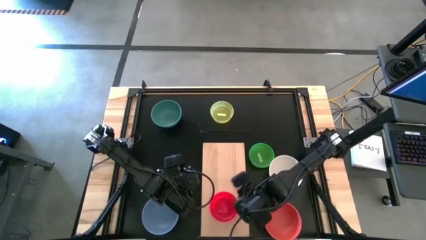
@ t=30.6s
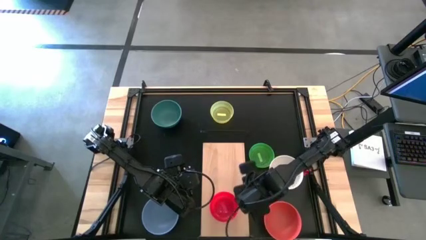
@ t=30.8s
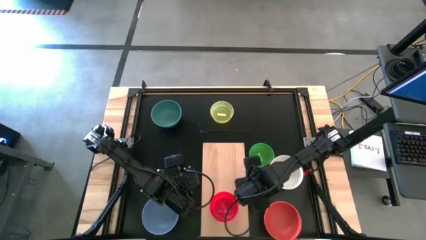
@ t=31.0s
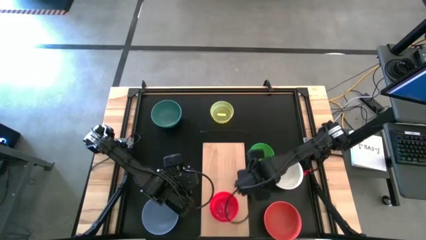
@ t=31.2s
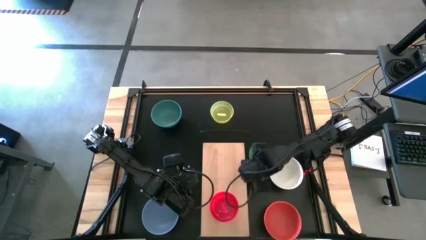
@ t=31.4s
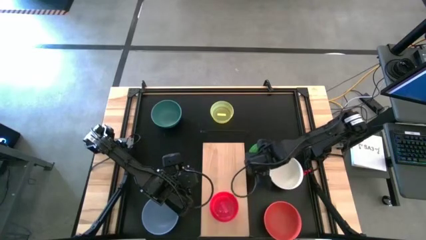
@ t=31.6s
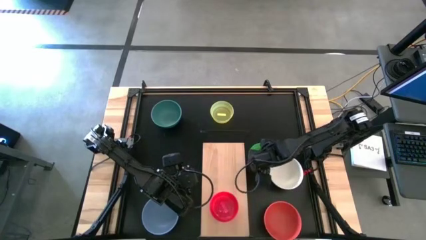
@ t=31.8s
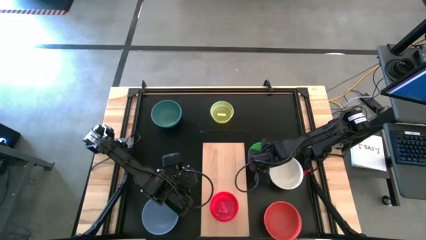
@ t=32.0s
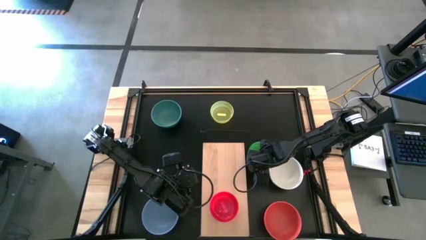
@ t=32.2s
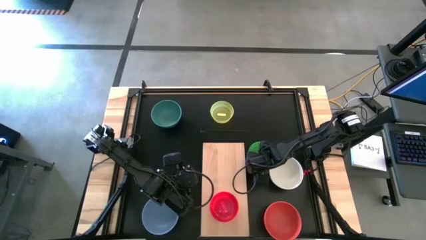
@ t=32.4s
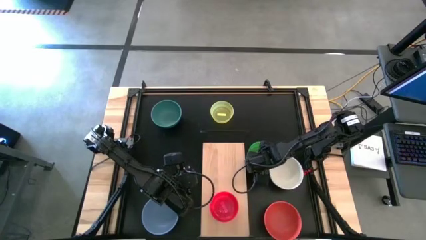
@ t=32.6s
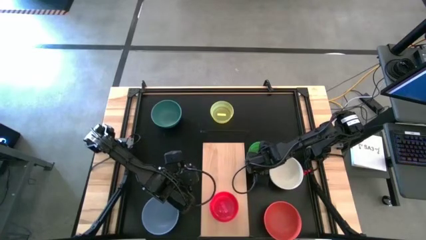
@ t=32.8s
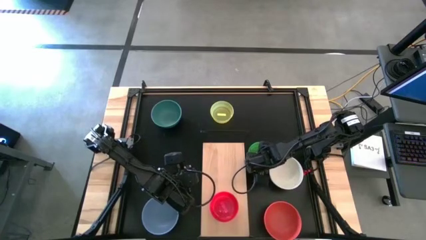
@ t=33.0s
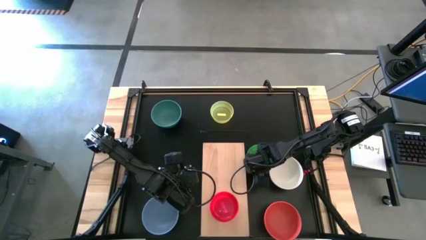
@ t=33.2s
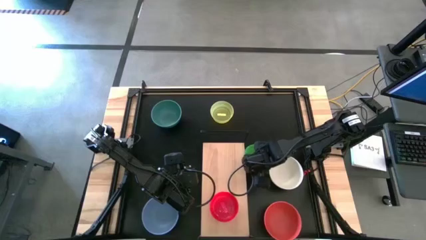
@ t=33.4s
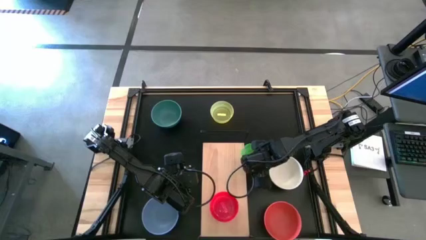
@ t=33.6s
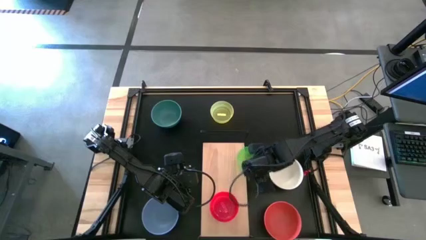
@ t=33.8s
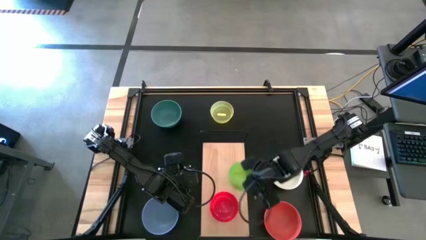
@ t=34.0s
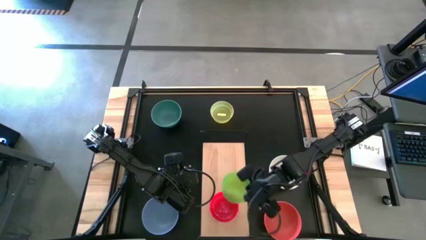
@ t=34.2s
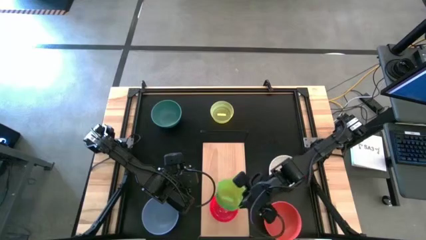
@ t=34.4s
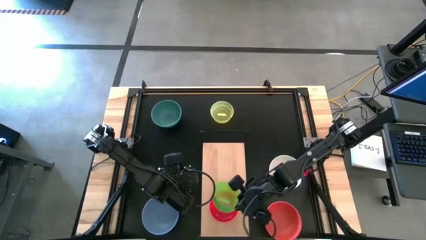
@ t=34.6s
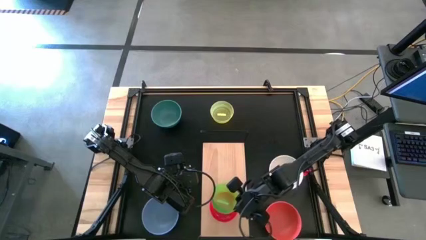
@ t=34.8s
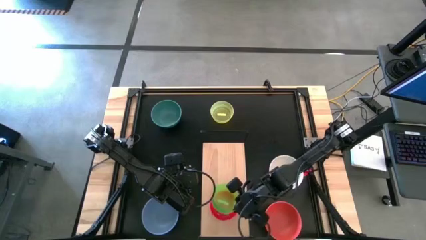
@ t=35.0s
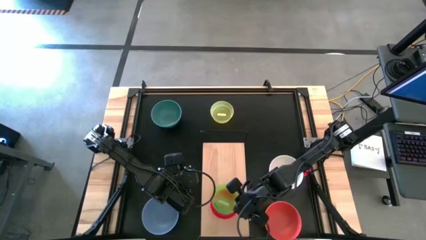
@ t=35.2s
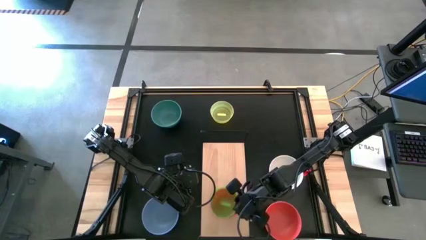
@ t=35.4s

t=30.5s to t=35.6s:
Task: Place and stack bowls onto a shelf
Stack the small green bowl on top of the small pink bowl on the shelf

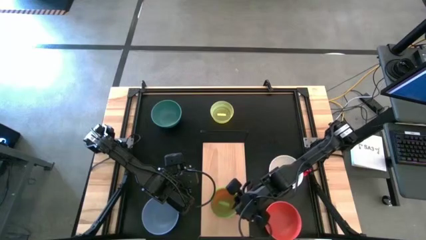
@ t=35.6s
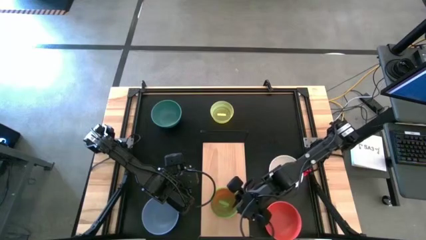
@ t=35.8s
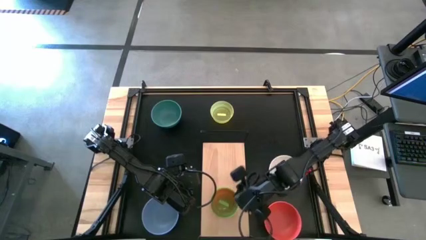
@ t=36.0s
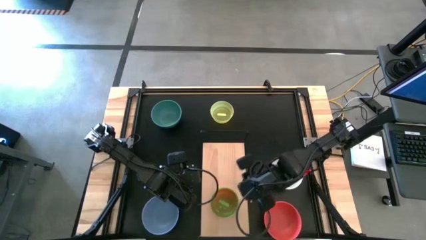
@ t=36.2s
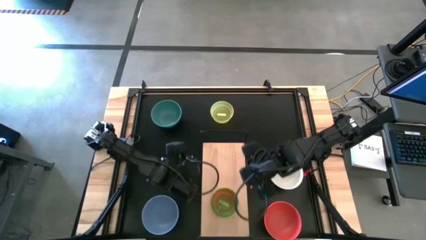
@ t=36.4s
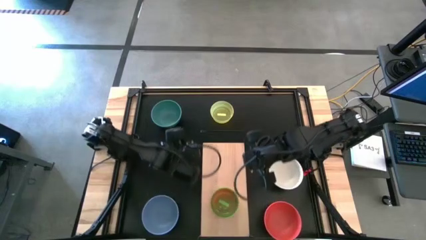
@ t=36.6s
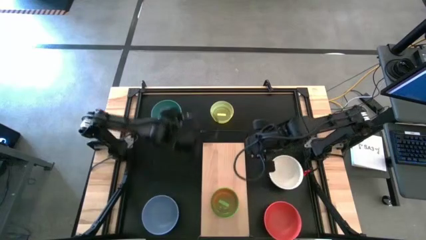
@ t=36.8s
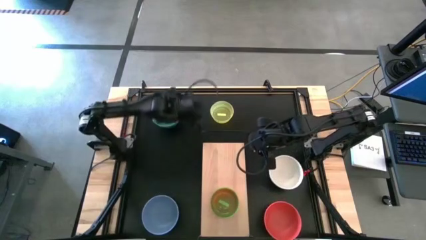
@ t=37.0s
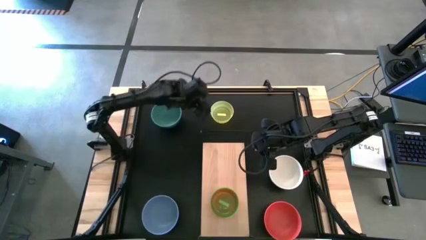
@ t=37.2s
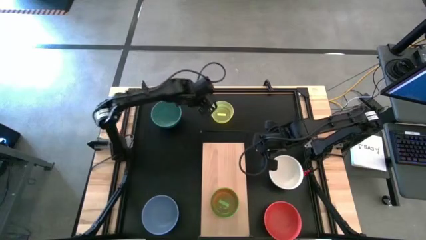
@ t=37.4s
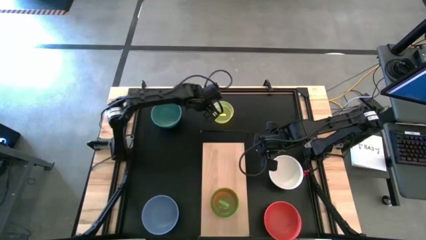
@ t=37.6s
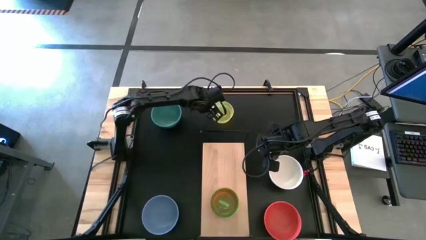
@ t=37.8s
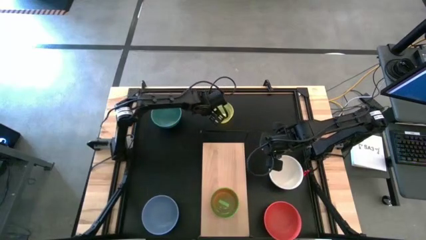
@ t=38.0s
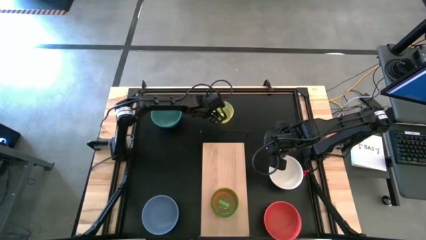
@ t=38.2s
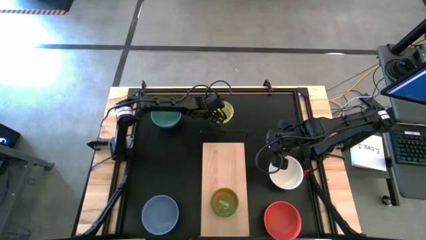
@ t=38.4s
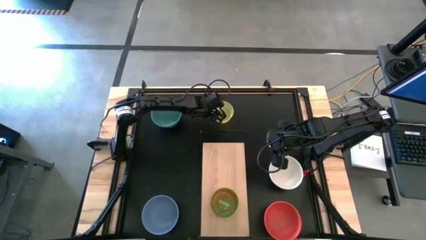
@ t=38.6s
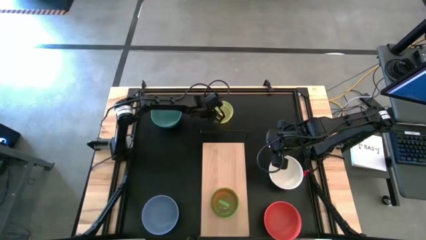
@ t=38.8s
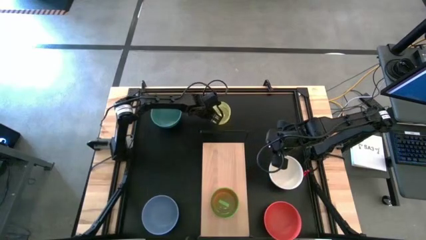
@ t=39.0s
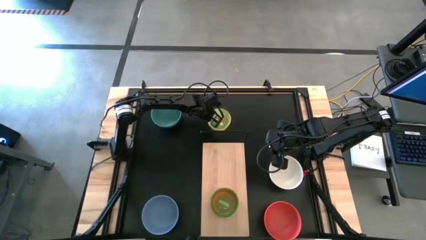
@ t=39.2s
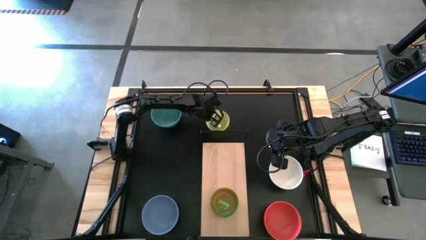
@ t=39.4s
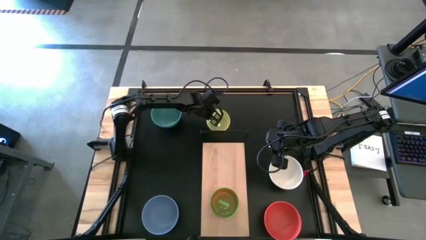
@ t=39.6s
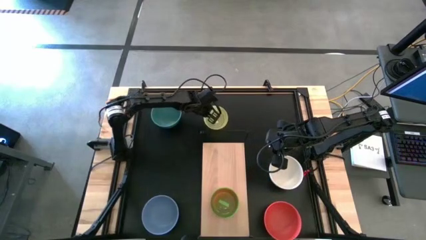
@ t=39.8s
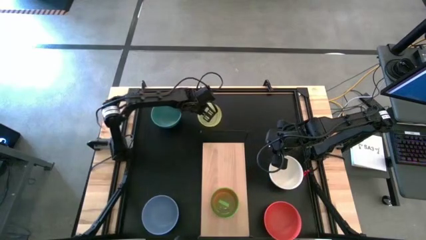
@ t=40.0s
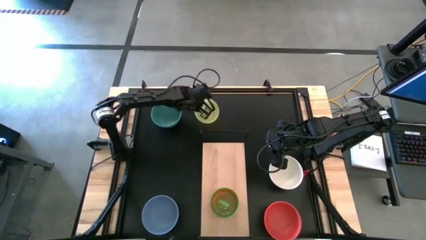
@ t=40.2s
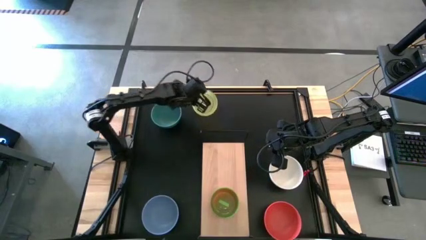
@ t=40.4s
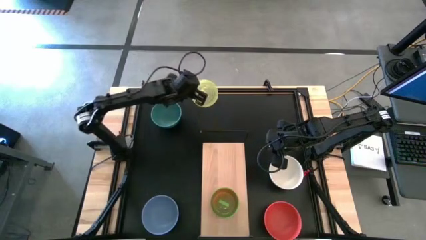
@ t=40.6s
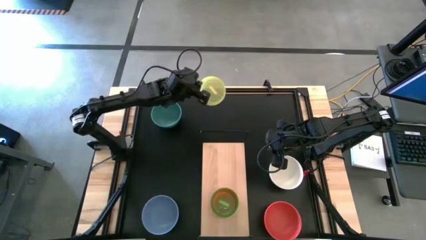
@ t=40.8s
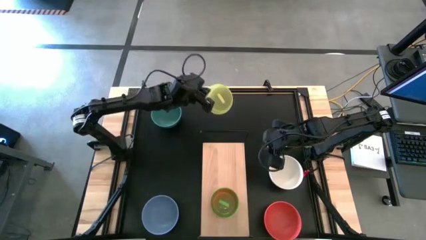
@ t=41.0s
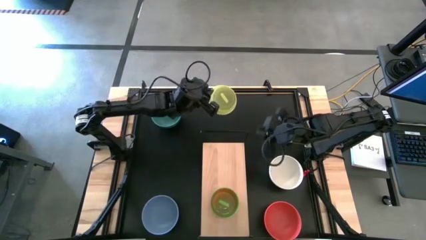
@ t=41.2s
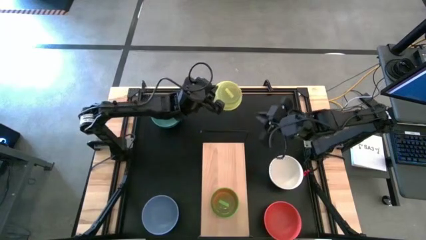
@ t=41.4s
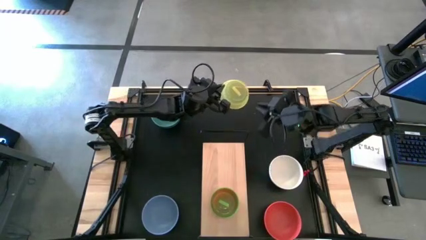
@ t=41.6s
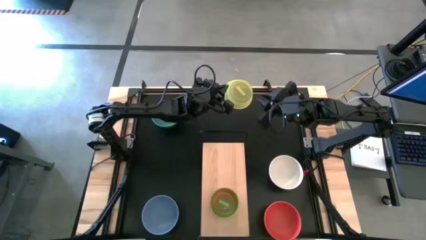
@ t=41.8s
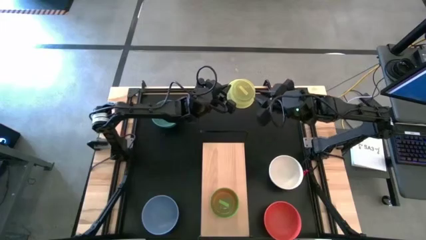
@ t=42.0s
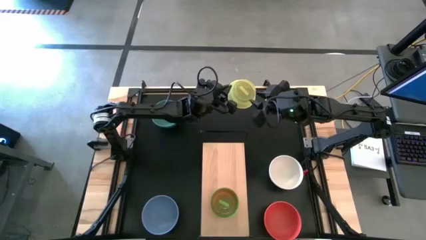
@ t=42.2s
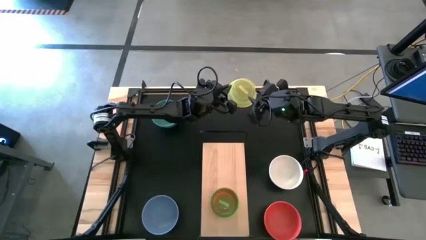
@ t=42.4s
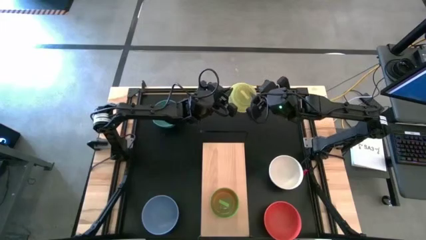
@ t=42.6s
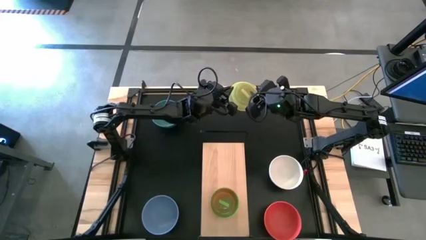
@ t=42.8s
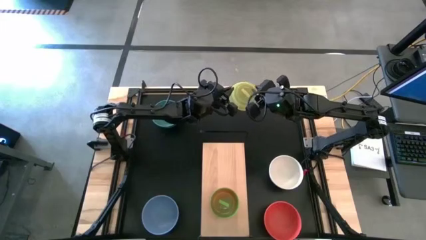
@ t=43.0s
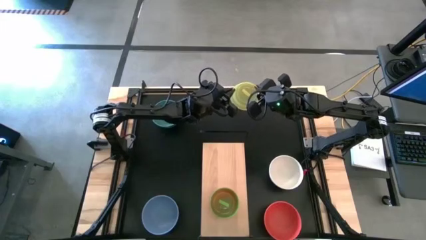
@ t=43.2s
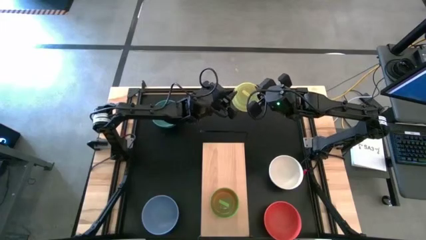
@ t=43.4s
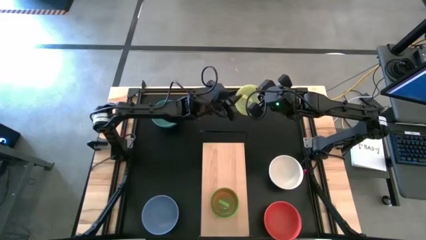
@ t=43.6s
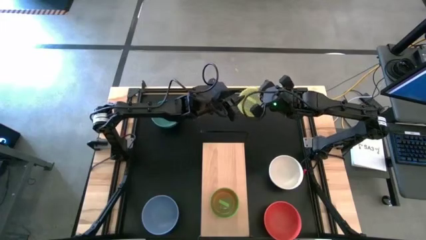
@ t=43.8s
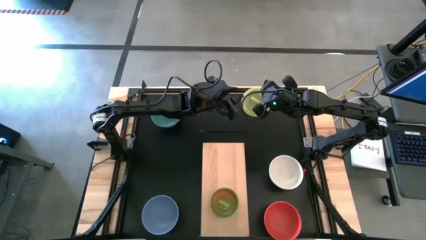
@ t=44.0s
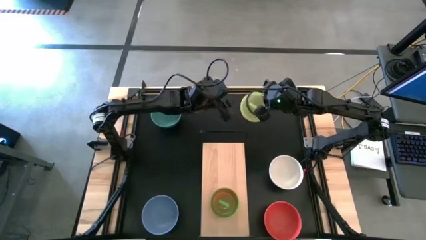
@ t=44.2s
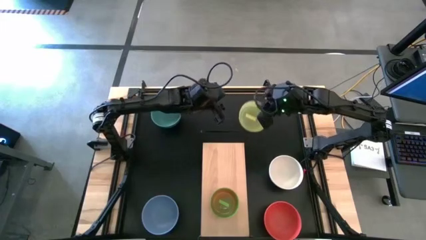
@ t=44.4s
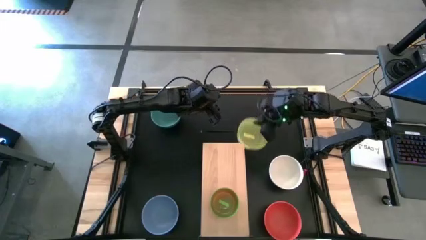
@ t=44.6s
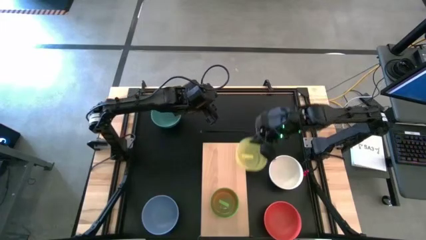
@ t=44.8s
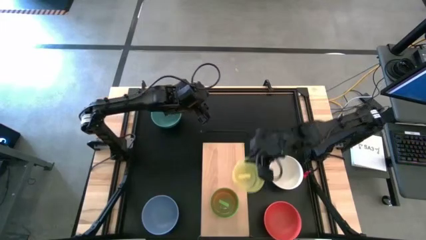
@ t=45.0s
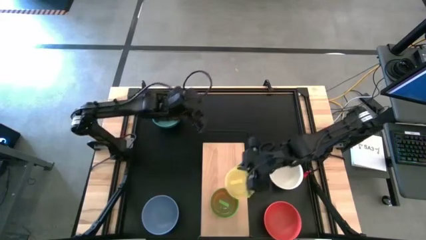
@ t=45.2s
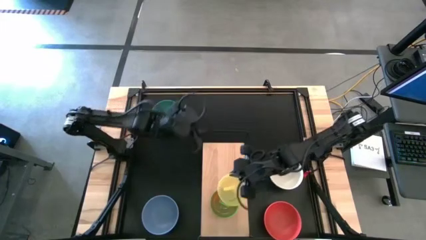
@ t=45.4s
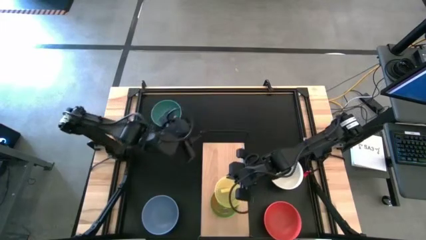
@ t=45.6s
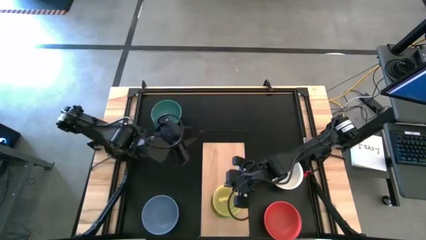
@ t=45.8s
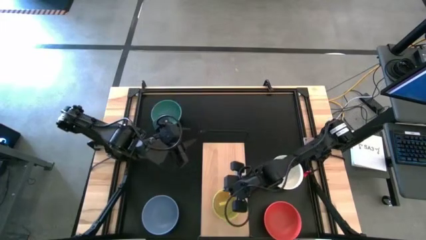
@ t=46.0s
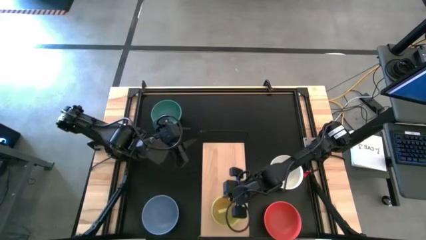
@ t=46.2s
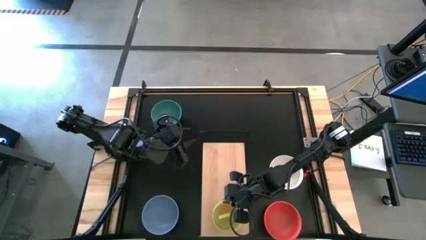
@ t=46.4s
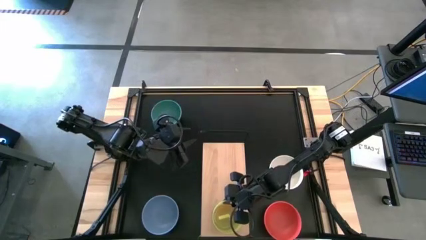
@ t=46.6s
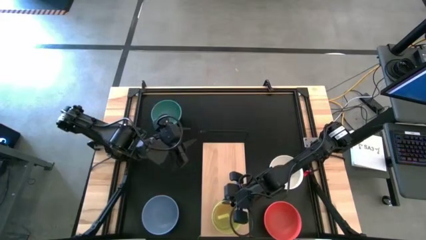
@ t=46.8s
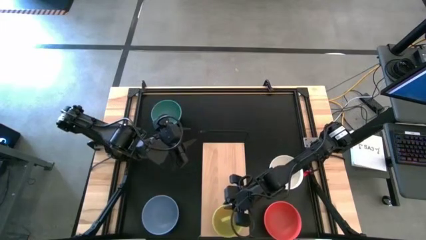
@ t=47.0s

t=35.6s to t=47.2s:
Stack the small yellow bowl on top of the small green bowl on the shelf
